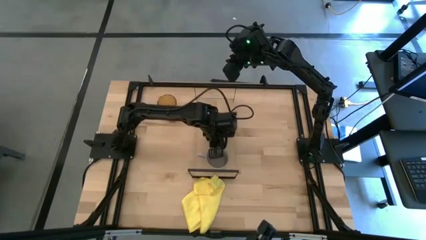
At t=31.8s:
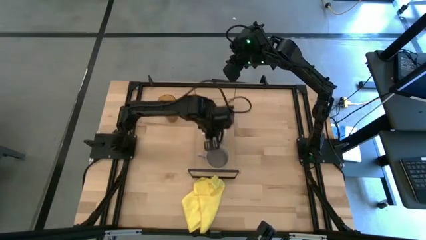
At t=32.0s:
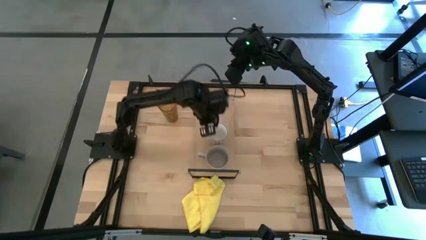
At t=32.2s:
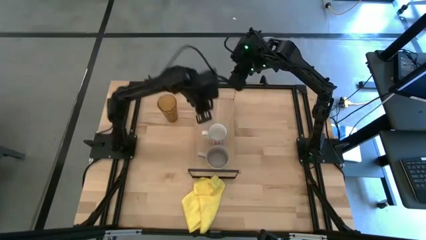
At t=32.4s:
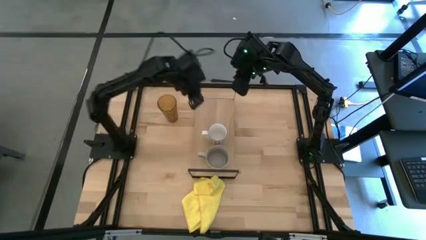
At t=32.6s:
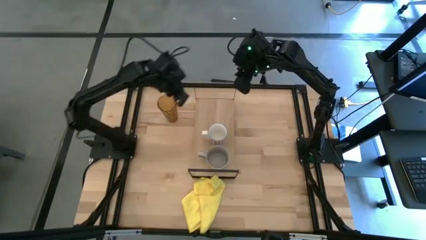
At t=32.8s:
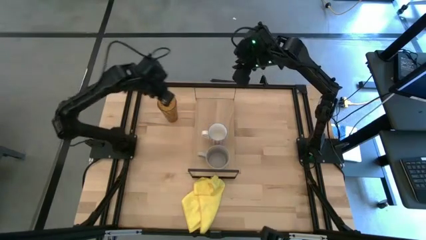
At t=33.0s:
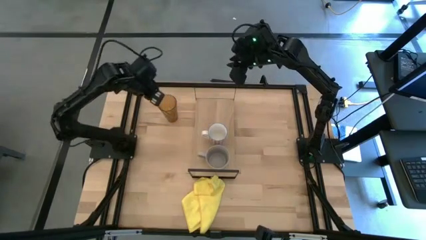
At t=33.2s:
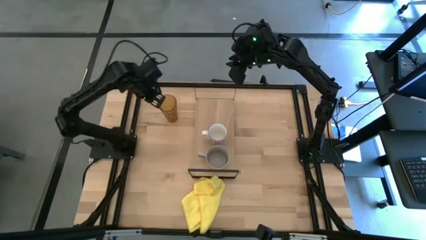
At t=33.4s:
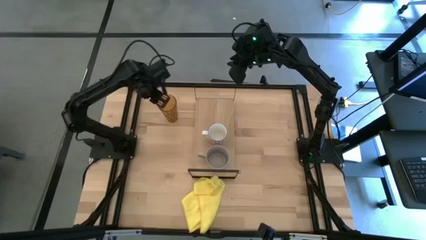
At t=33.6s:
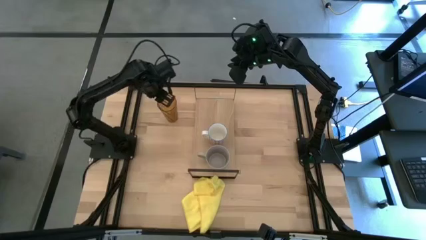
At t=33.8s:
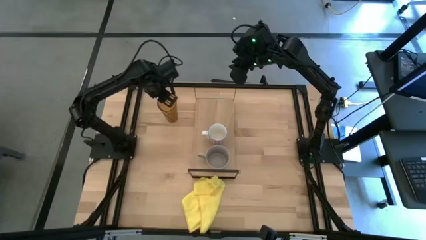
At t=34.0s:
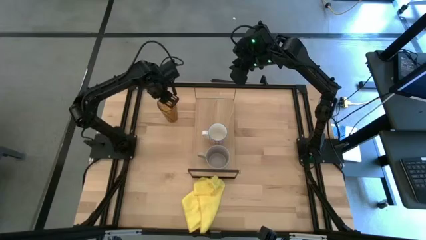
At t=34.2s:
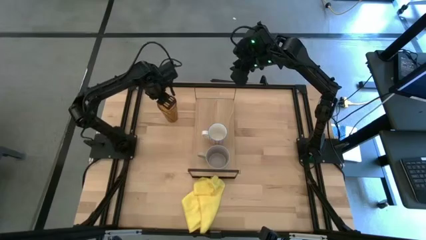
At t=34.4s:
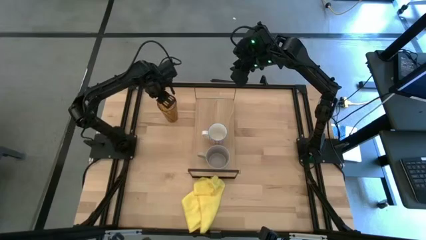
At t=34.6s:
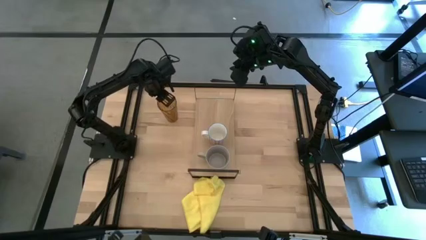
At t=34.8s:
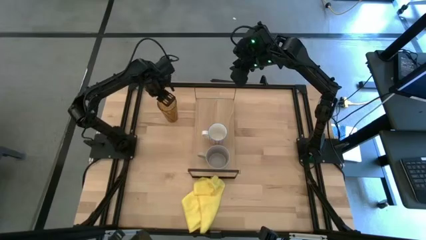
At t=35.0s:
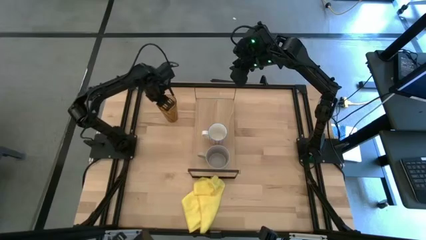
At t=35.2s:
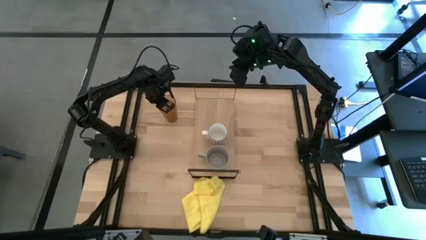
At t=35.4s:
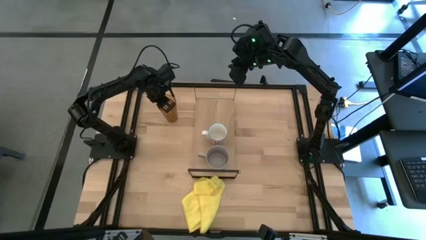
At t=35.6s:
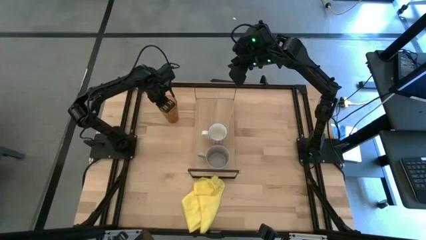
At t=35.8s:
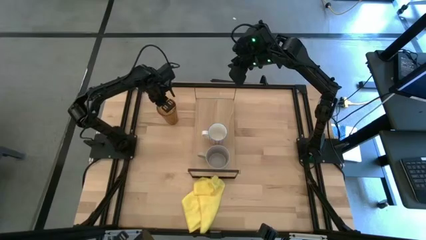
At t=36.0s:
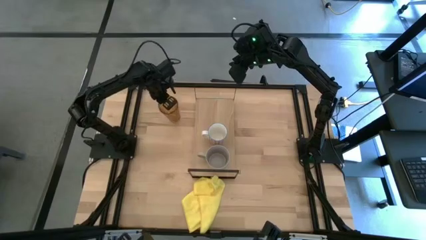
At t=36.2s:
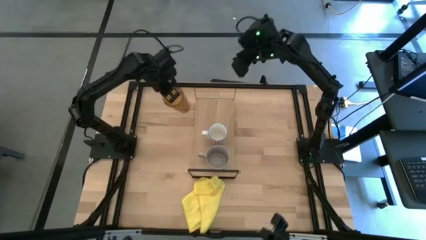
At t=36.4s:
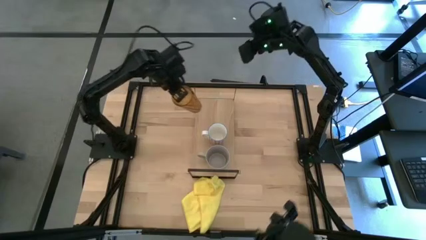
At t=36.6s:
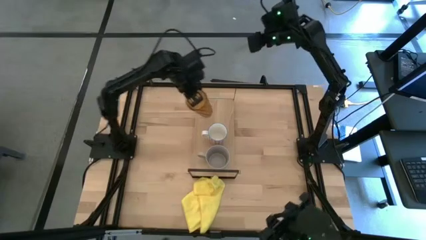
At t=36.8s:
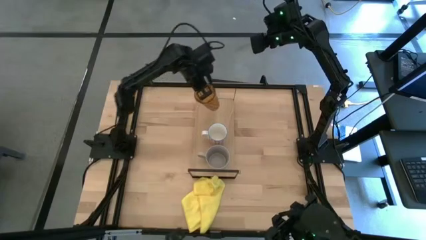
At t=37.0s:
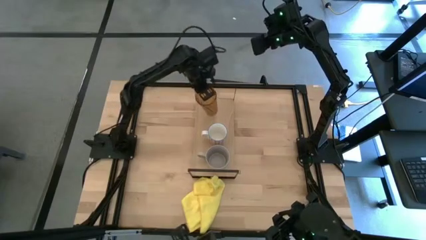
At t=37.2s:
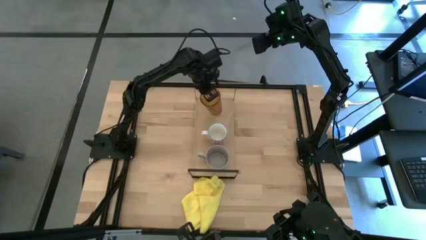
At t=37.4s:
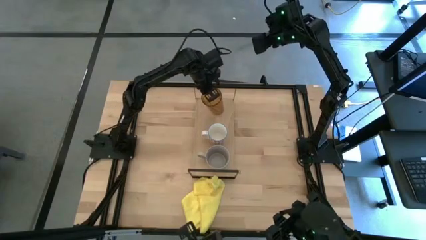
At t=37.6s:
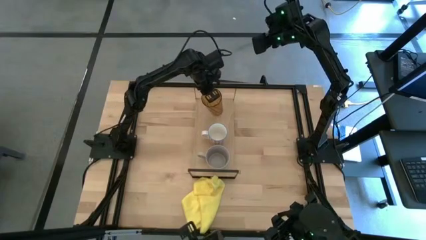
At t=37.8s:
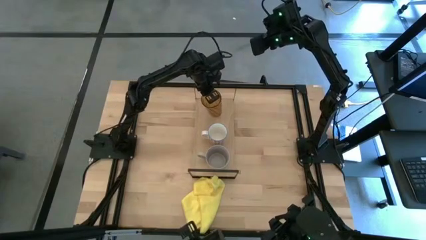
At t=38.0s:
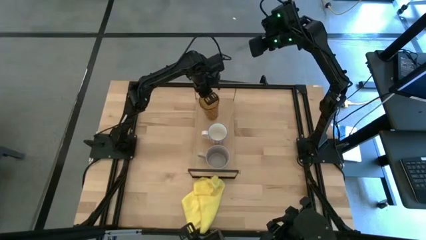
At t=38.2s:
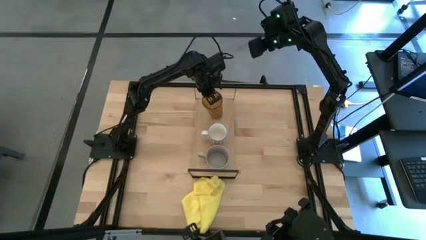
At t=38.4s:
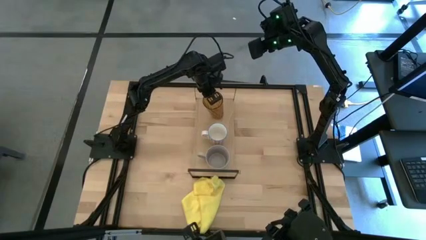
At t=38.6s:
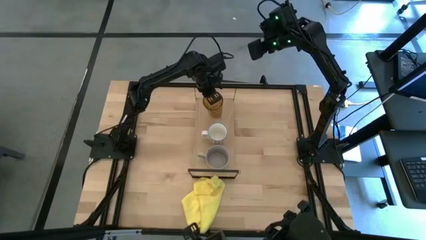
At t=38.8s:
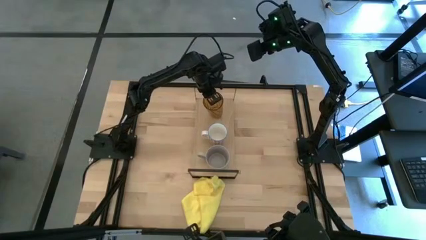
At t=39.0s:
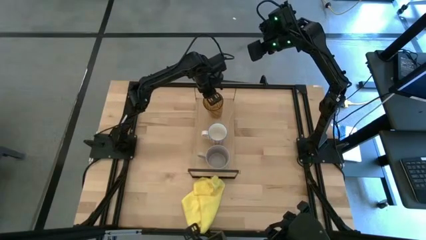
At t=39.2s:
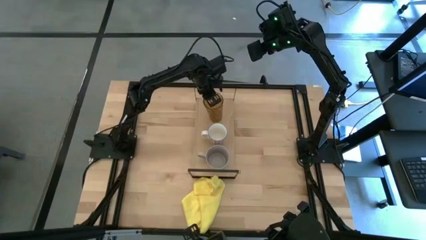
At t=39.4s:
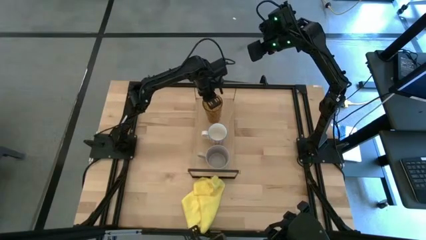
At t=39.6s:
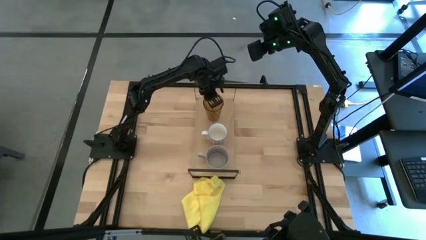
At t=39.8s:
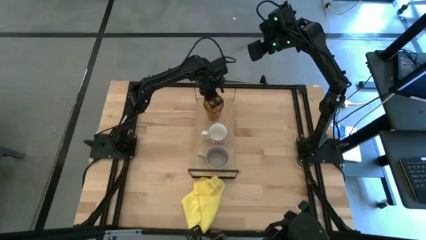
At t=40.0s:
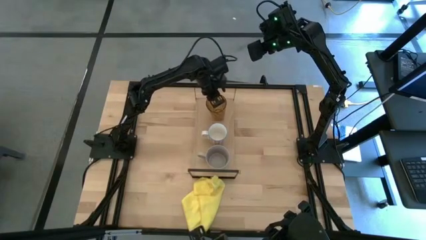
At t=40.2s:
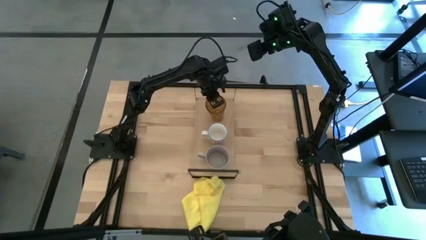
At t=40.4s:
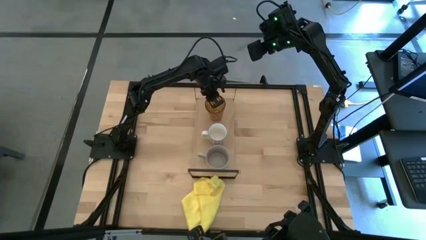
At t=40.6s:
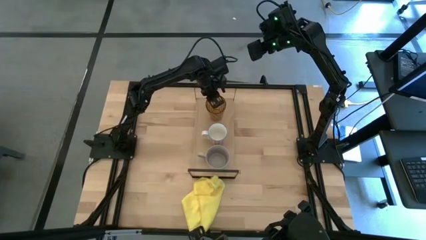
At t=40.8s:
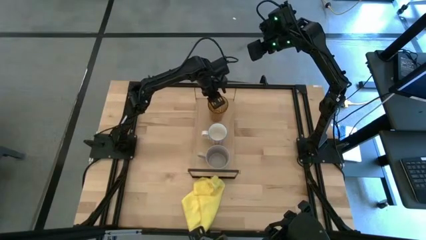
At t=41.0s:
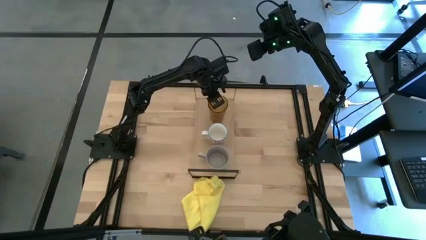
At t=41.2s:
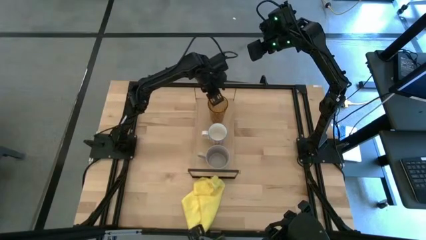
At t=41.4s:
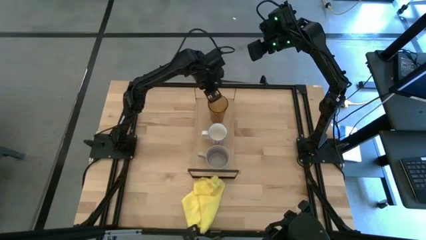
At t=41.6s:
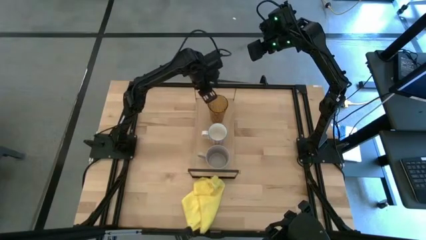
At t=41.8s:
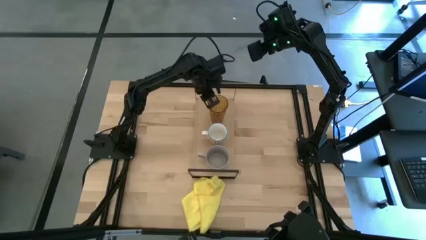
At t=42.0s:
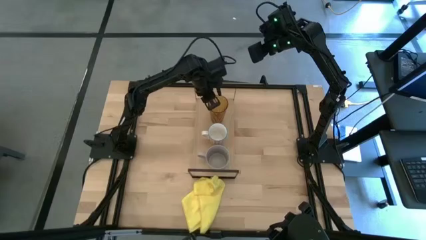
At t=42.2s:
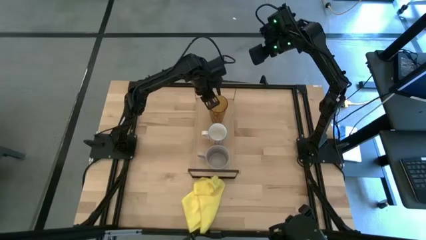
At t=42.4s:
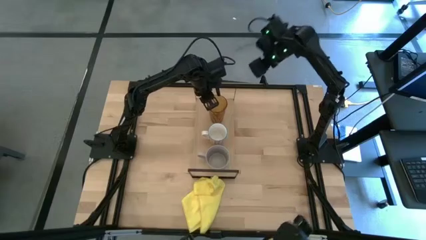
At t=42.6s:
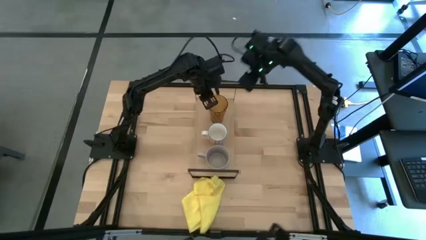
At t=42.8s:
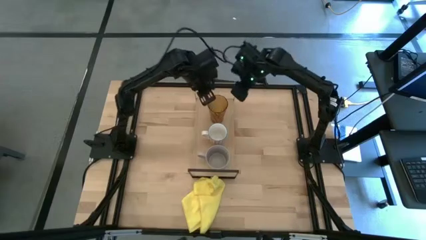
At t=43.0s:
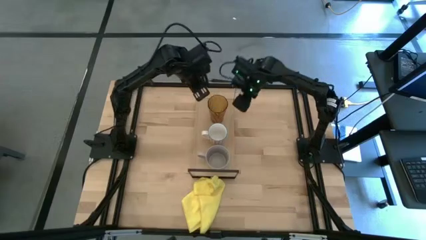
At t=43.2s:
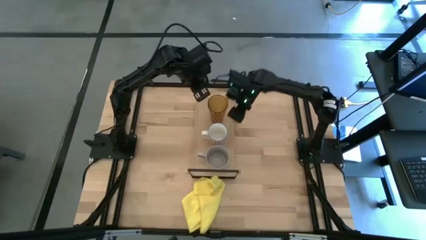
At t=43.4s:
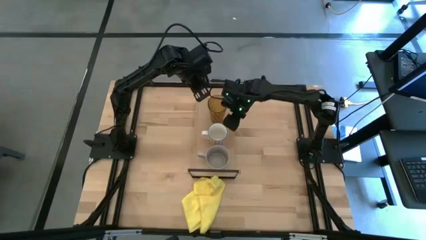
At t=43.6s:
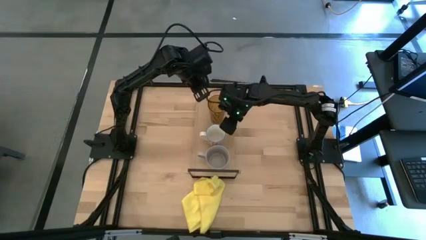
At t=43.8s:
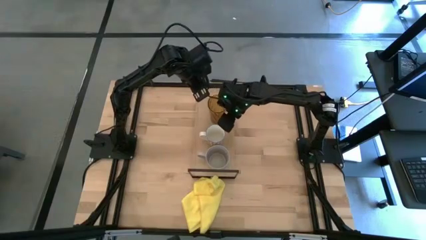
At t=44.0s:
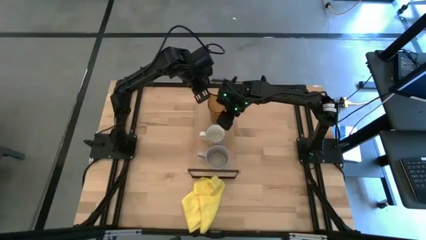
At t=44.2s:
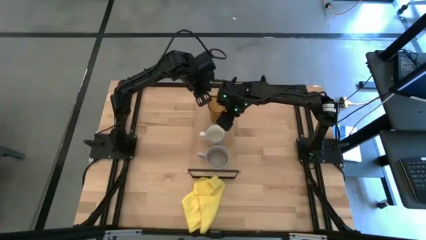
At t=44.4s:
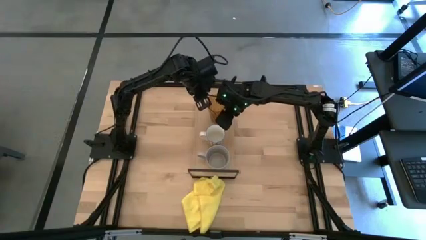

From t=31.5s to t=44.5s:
Task: Stack small to large cups/mugs on shelf
Put the brown cup on the shelf

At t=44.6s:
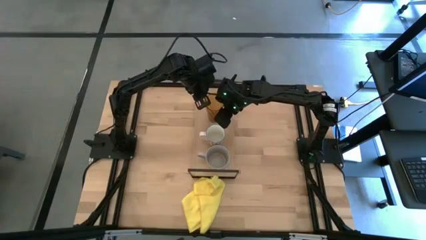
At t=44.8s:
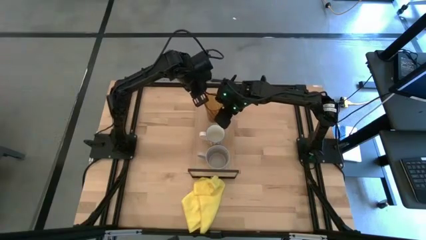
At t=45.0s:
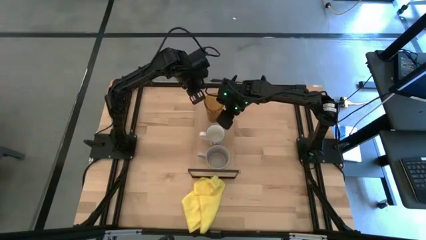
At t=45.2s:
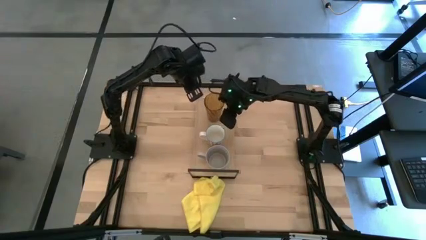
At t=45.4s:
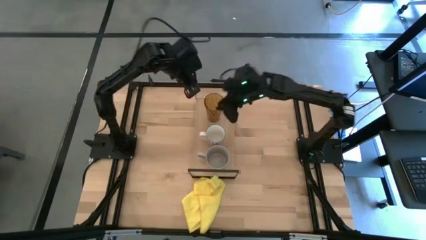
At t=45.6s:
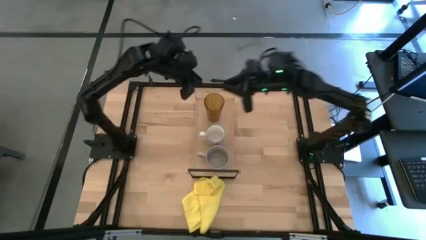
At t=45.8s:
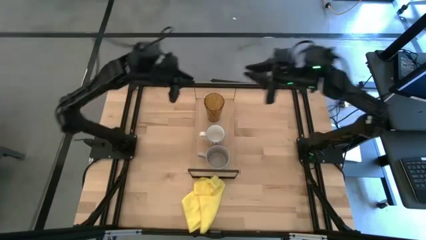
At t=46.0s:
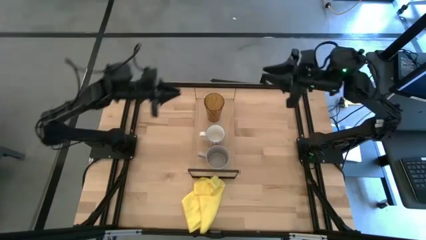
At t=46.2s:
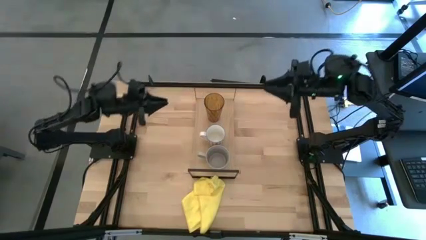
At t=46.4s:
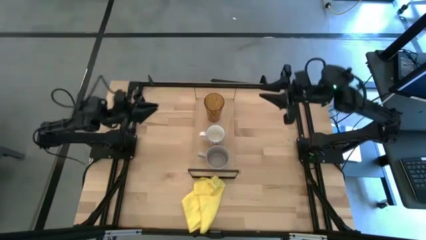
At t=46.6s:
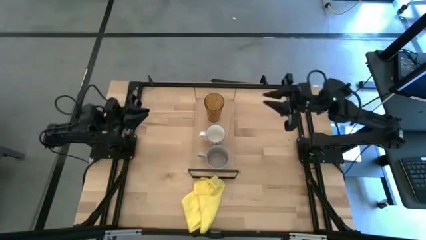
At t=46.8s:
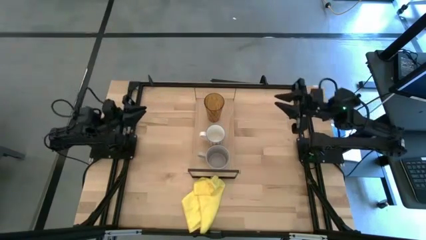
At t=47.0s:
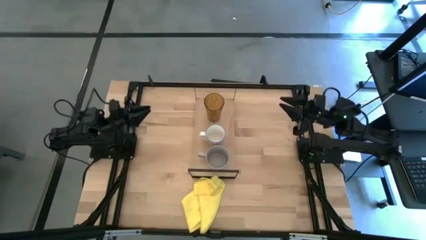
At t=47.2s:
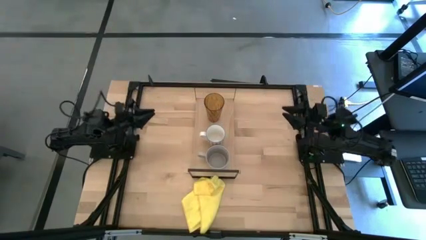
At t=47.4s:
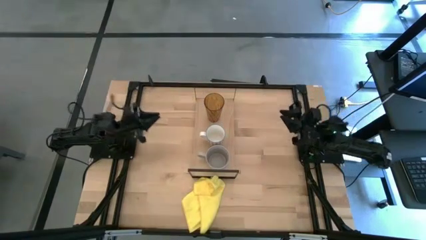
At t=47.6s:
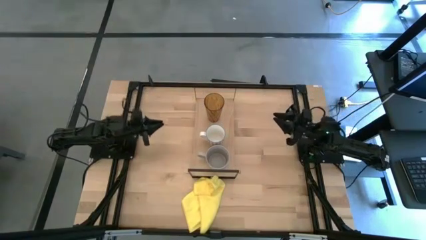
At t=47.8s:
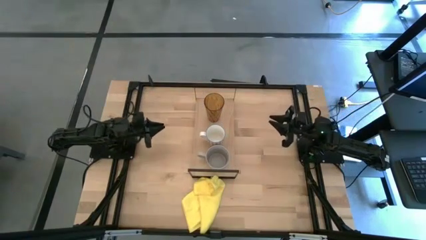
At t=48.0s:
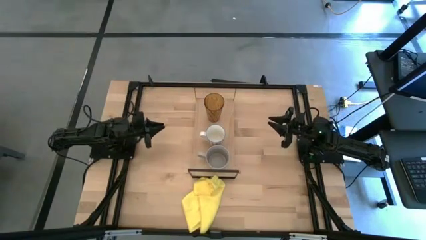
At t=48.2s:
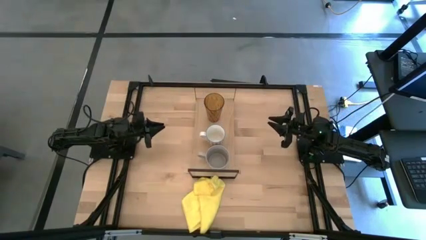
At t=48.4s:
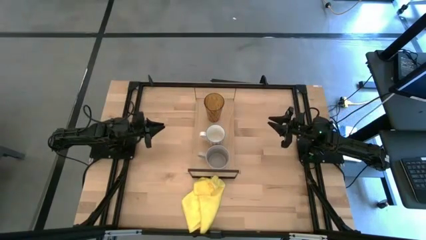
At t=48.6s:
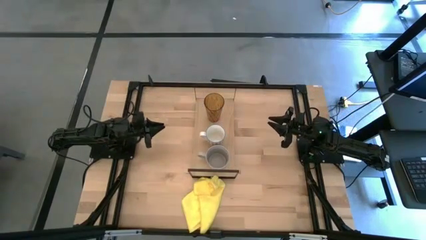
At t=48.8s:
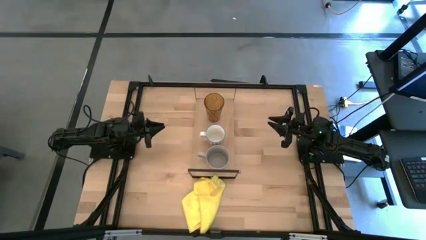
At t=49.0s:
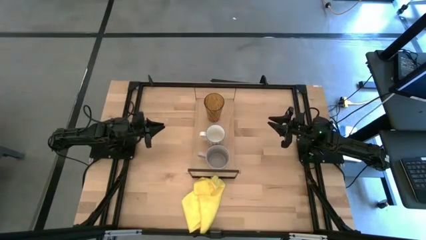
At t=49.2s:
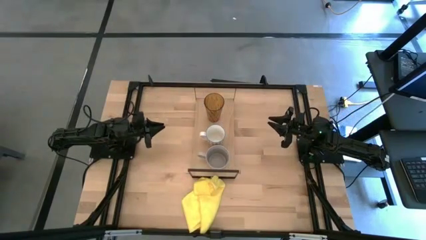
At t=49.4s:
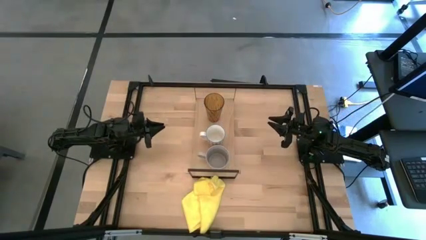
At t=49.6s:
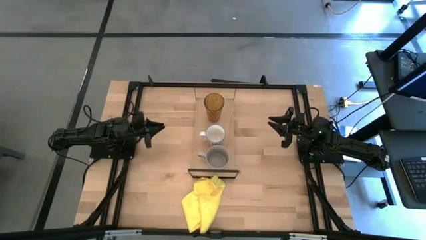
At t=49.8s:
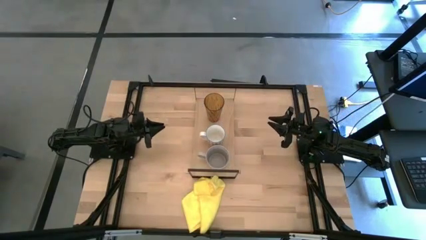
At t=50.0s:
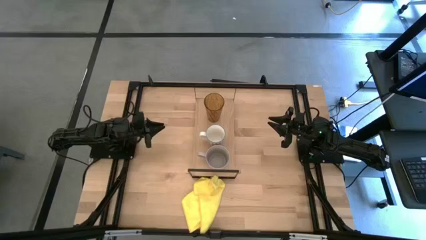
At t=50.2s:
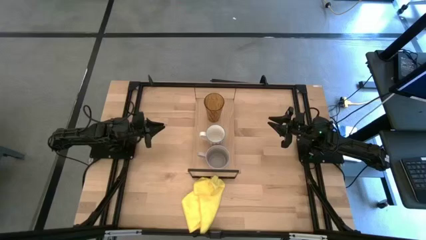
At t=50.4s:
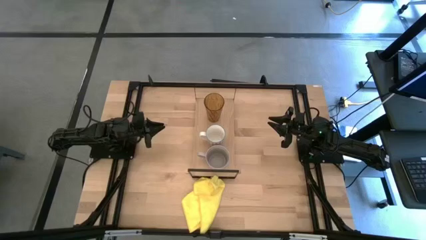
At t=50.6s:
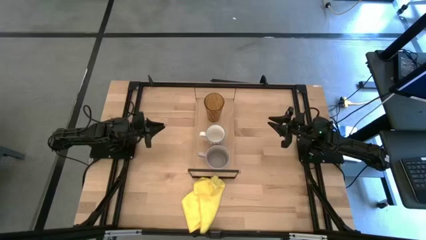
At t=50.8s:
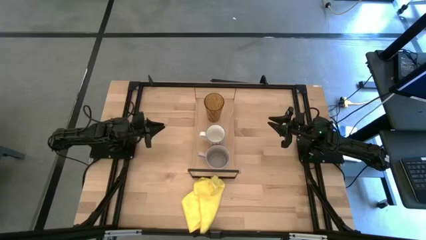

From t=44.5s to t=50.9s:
Return to Home Position
